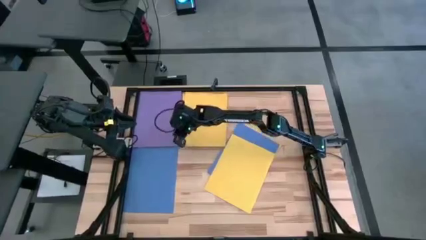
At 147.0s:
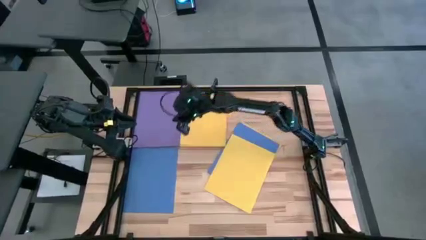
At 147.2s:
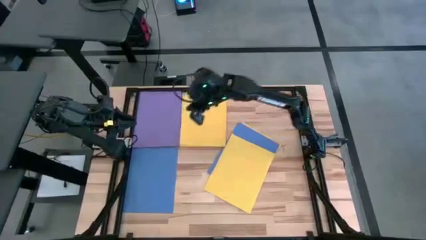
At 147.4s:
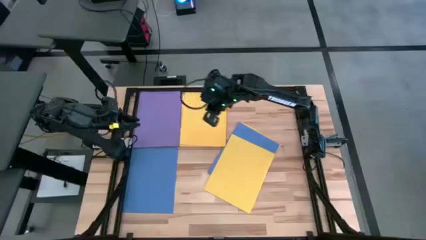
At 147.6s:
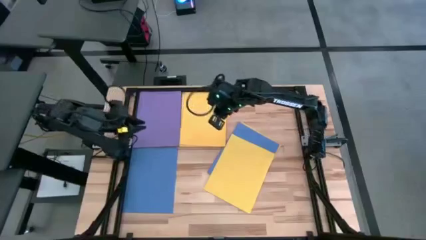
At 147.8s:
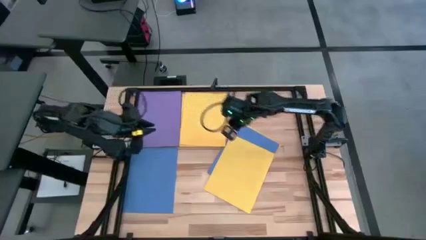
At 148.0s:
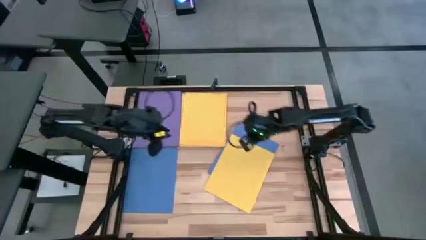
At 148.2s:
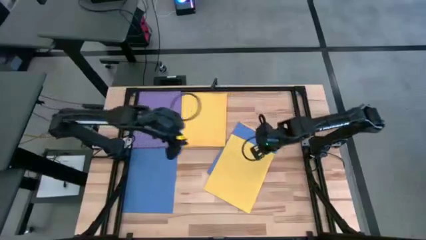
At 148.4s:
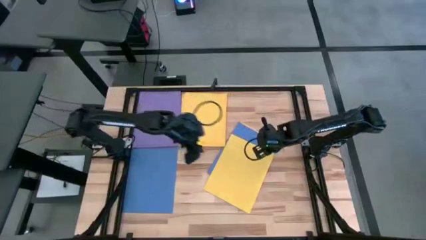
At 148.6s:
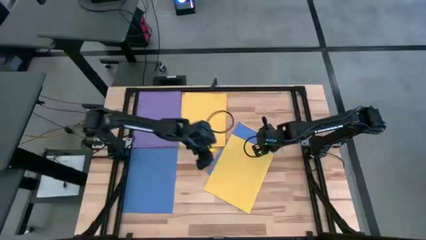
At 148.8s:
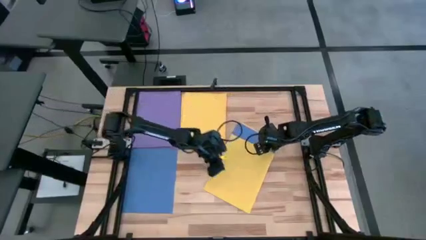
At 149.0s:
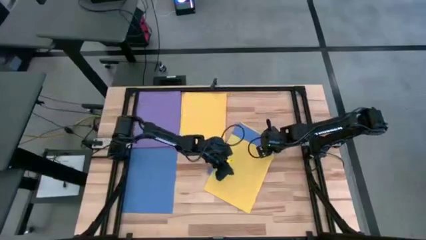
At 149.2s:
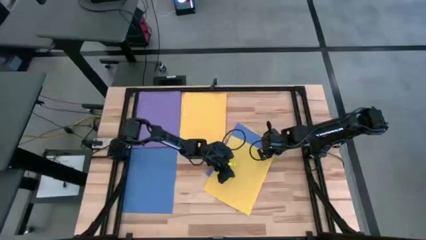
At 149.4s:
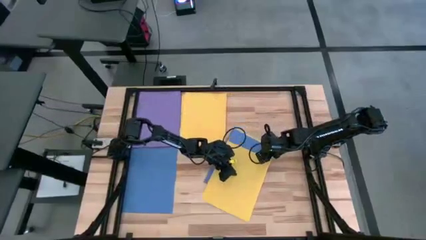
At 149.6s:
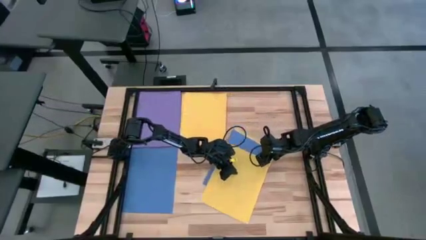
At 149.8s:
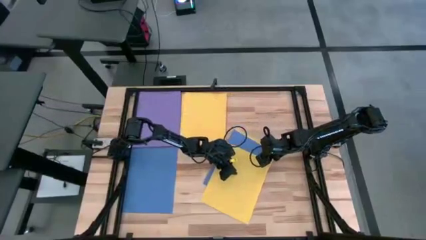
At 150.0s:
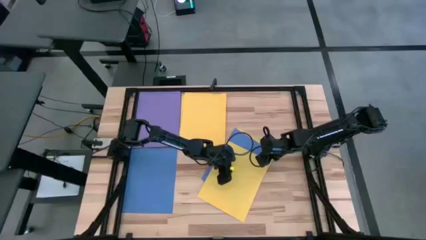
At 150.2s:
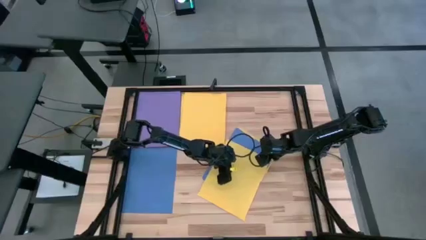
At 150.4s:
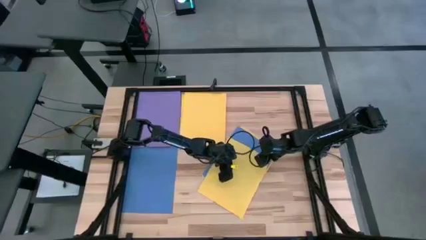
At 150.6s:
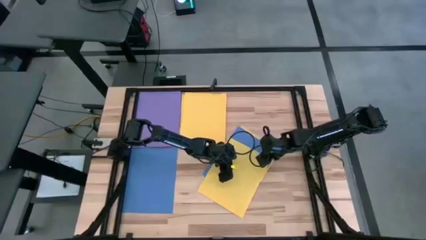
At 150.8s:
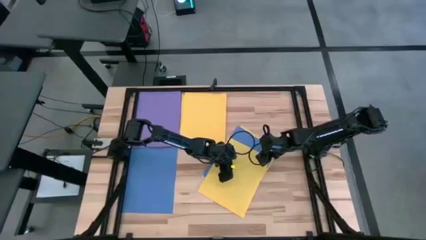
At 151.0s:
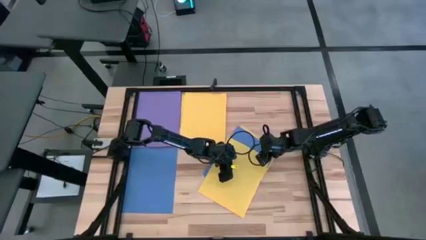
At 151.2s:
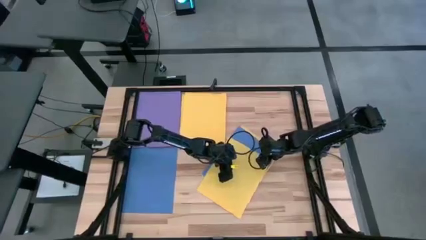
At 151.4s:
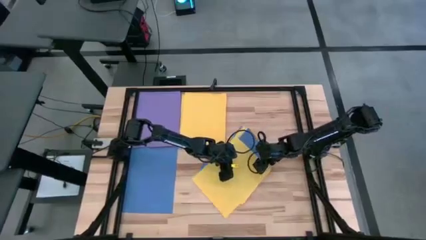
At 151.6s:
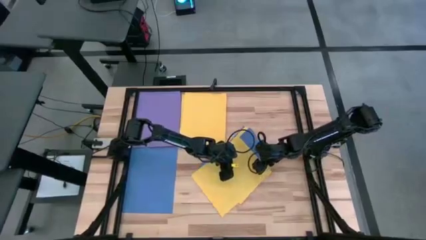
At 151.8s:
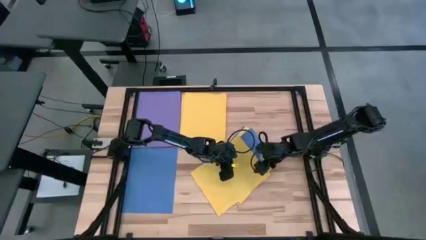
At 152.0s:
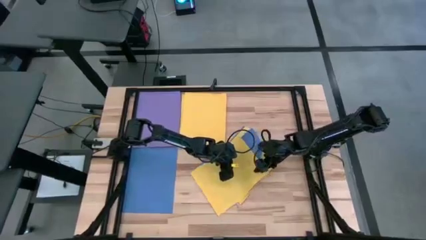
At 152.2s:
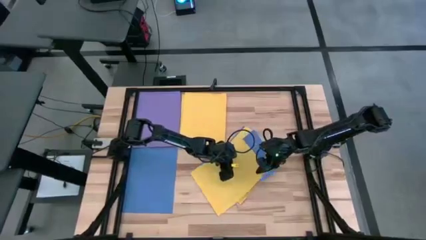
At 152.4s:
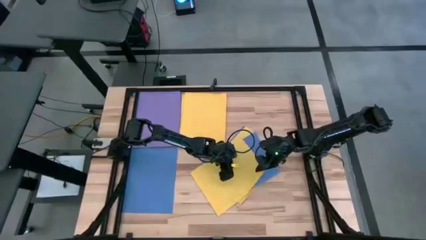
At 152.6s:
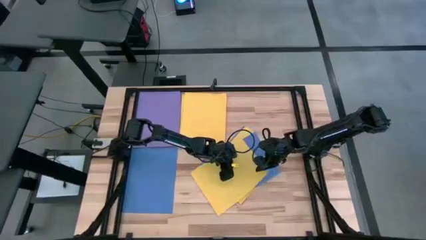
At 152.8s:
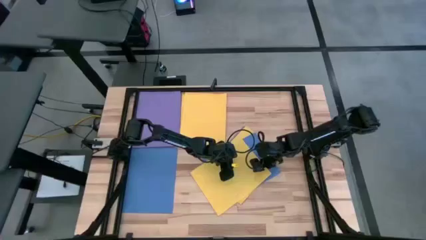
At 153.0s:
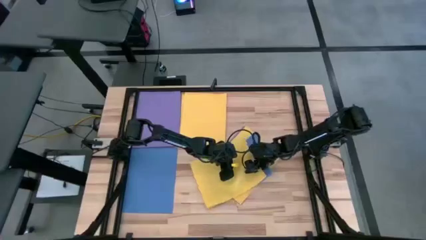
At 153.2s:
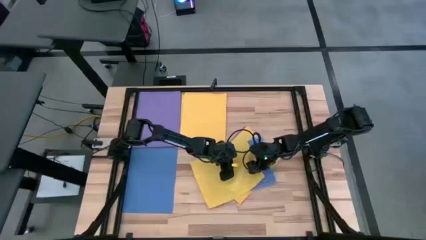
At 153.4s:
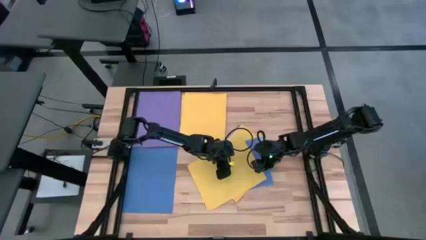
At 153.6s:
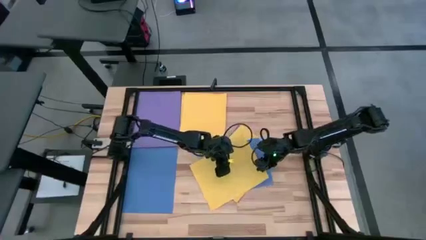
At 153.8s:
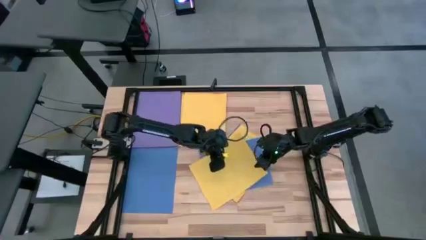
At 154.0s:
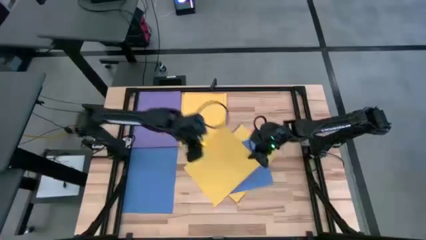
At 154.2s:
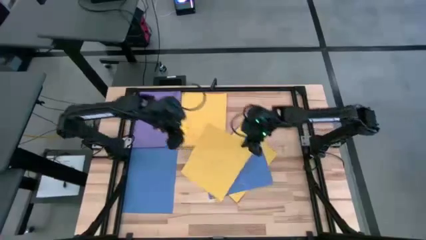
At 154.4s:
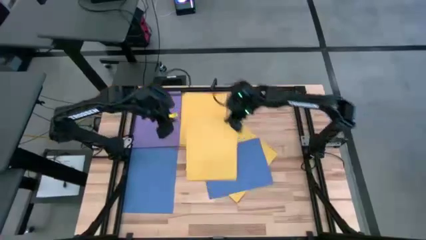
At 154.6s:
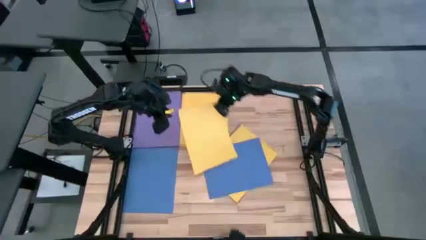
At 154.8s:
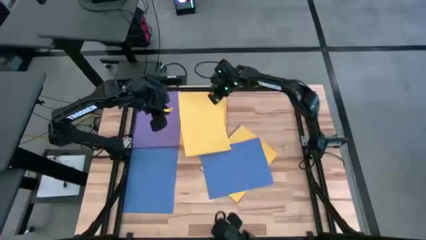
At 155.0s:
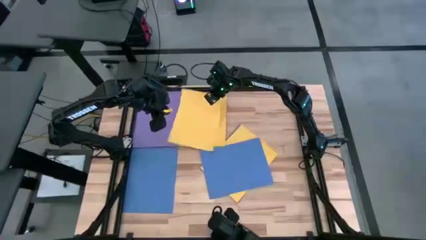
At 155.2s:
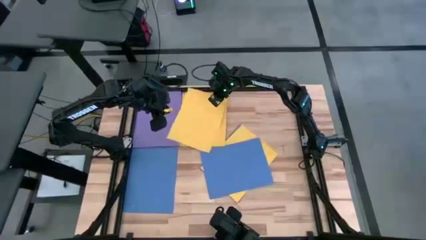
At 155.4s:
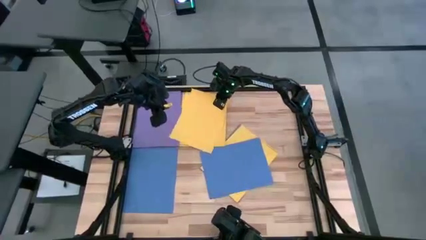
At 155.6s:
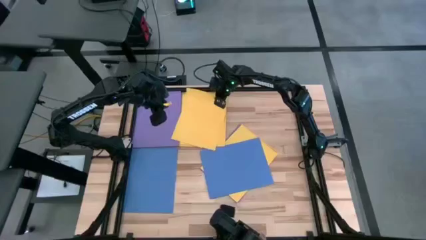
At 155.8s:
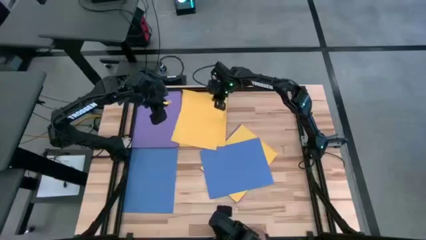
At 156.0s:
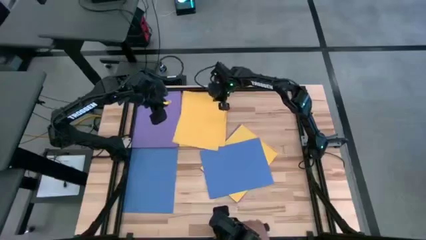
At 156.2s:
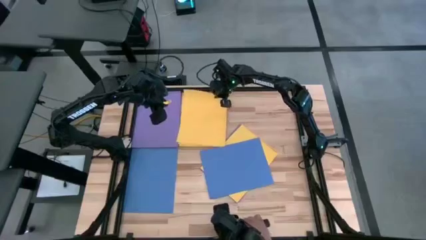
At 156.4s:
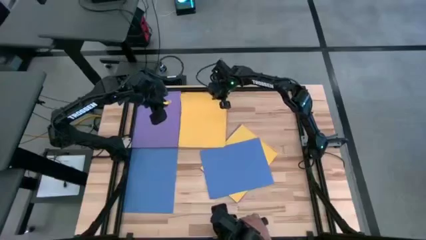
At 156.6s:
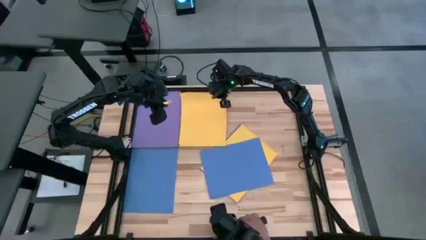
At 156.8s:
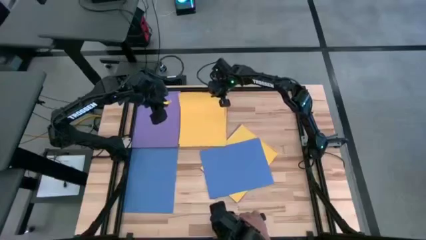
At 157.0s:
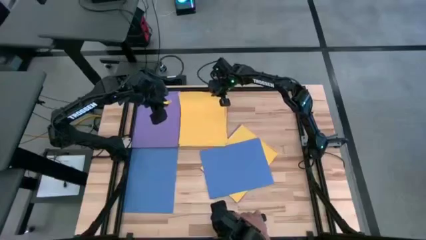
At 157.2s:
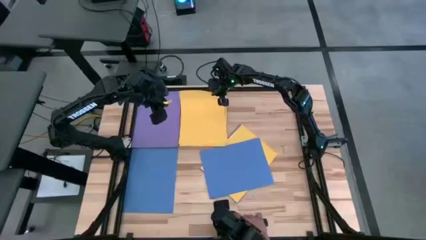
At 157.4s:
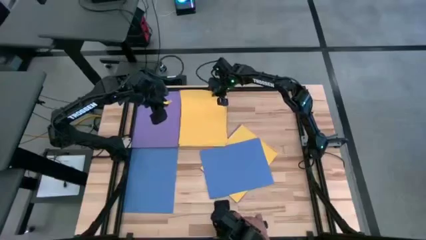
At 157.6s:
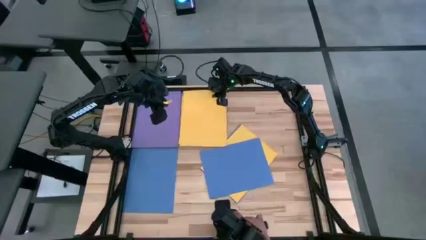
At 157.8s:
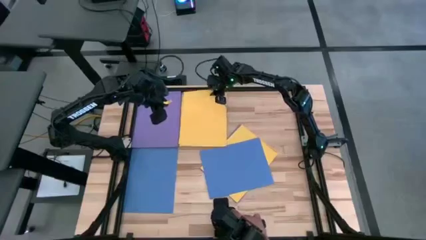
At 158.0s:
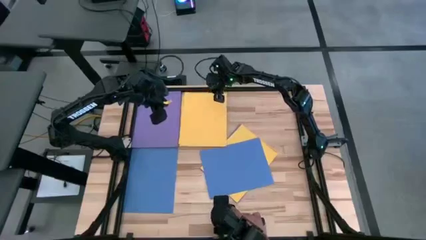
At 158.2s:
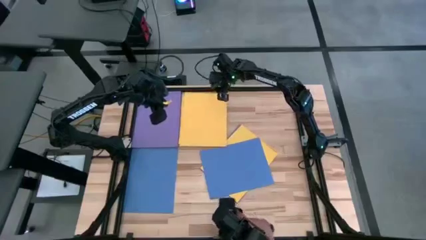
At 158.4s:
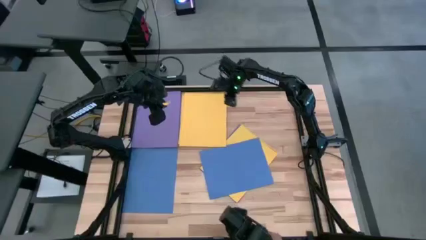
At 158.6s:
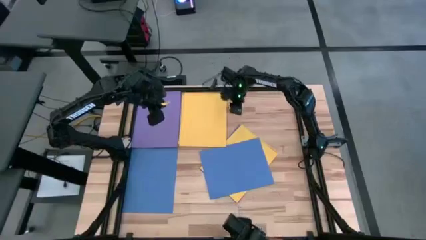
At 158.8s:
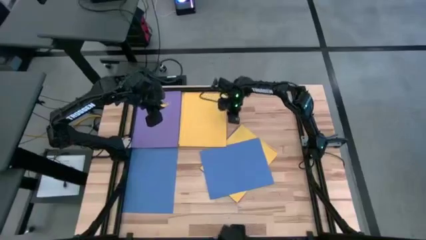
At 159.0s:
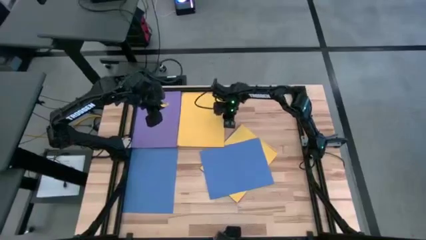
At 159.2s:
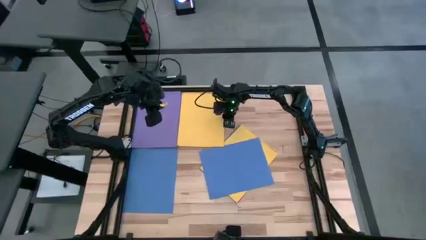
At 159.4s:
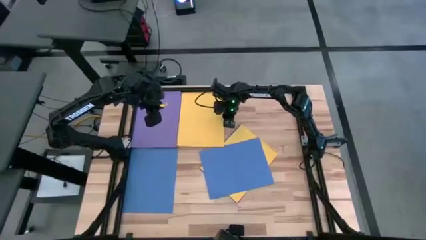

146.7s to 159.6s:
Task: Organize paper
Stack the yellow paper on top of the yellow paper

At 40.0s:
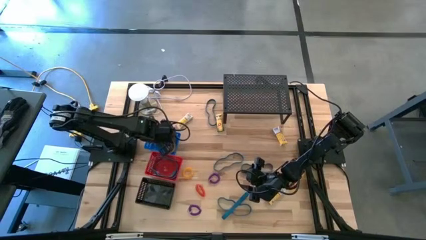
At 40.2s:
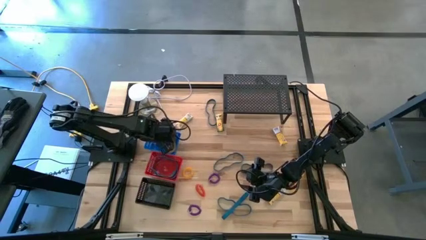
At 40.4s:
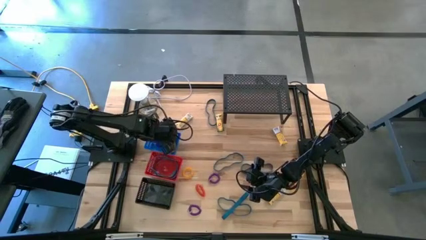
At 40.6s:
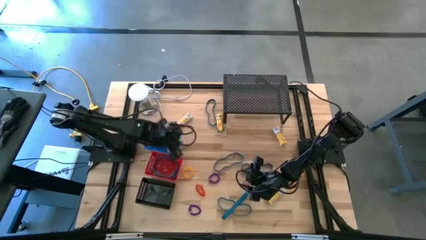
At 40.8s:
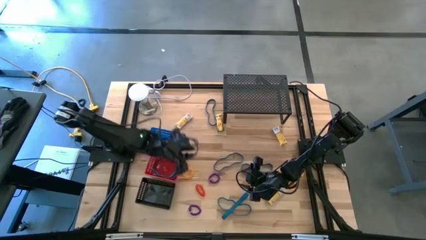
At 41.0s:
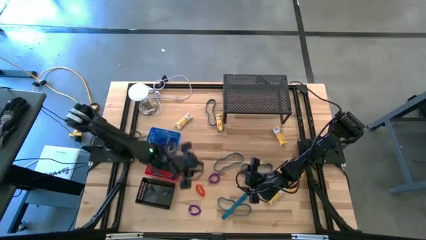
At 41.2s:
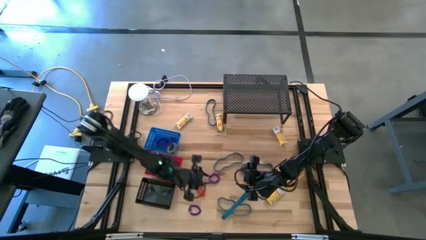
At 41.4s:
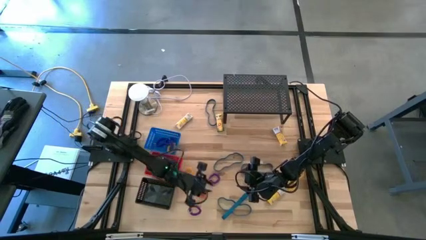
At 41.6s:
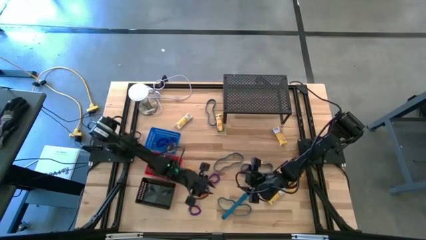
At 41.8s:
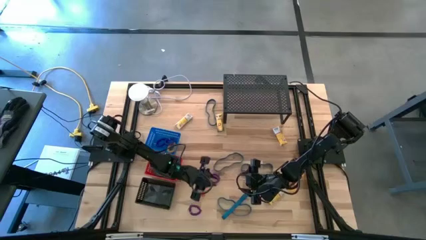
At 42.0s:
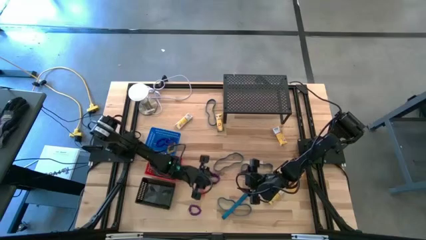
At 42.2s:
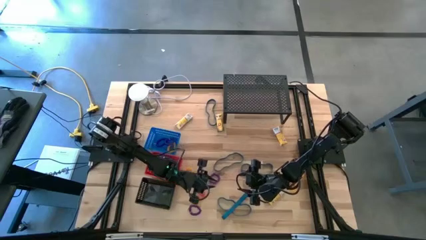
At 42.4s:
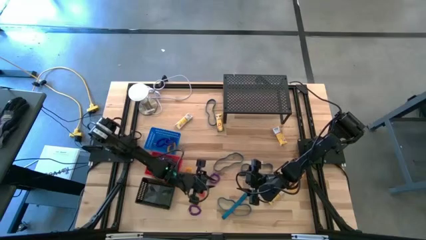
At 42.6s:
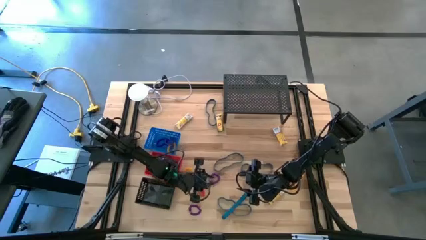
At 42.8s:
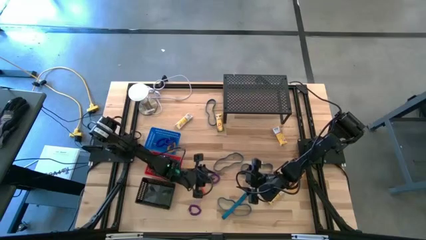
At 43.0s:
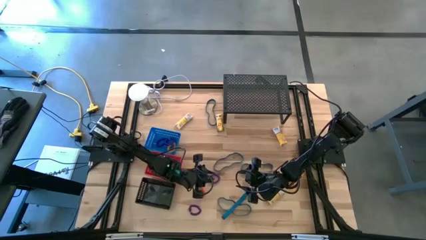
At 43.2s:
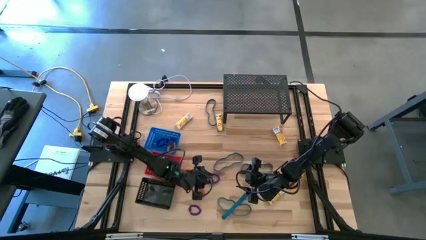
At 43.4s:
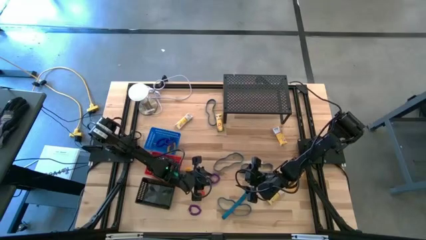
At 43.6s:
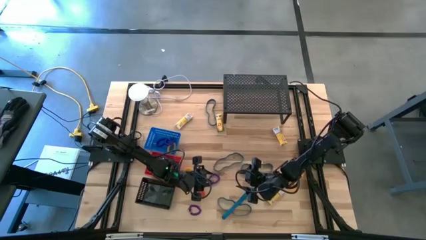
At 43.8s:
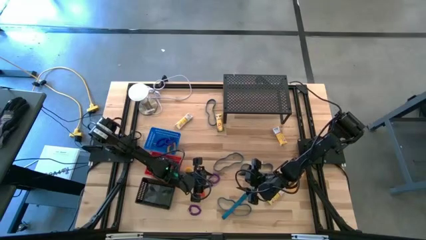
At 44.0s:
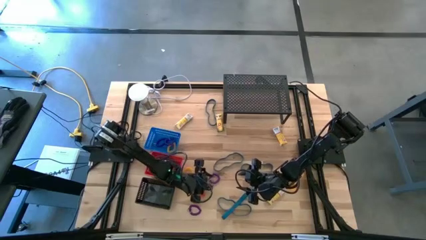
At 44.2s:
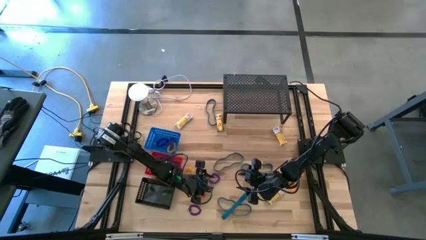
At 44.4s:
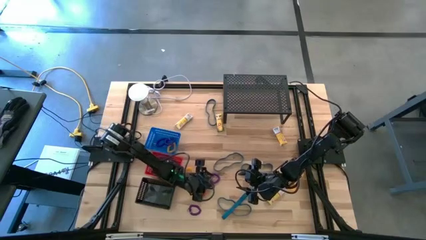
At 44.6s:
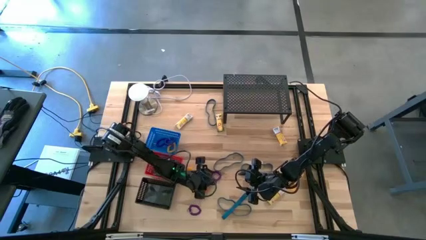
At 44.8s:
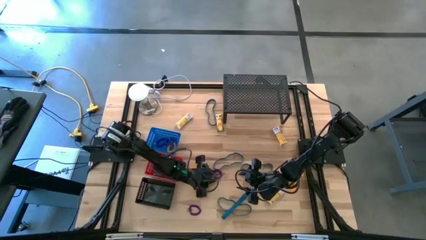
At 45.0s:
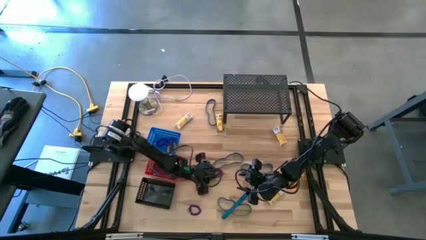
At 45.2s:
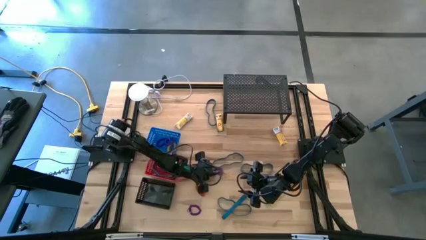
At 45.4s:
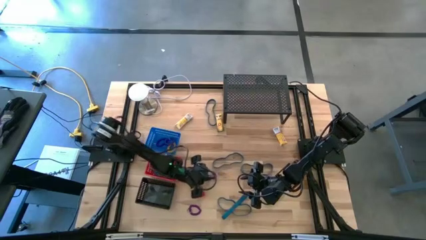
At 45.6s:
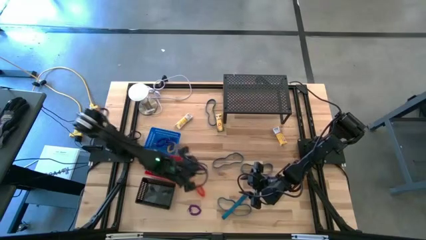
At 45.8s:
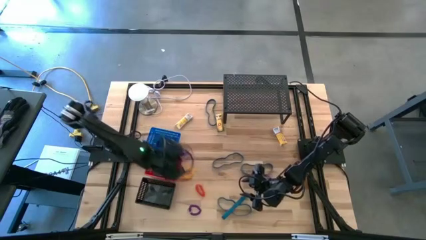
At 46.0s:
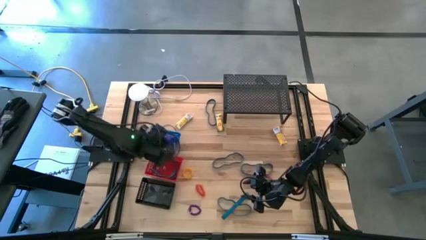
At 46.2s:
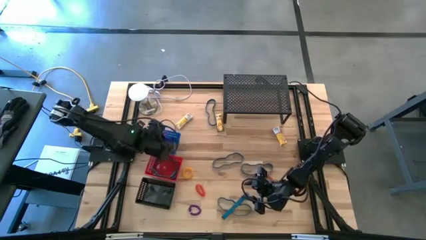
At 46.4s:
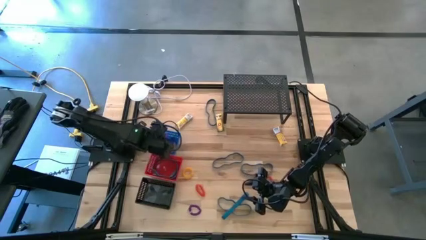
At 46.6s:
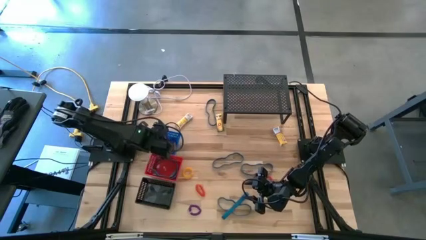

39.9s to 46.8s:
Task: Pick & Place Office Desk Supplies
Put the purple spring keychain into the blue bin
